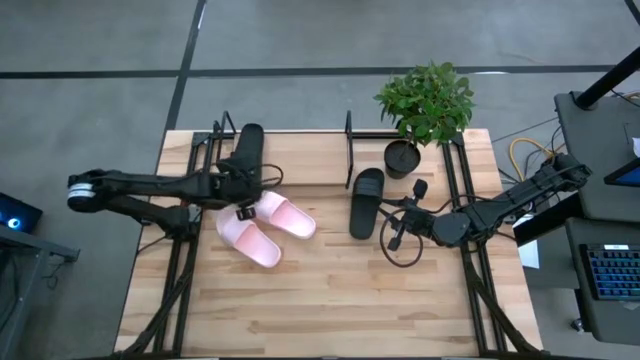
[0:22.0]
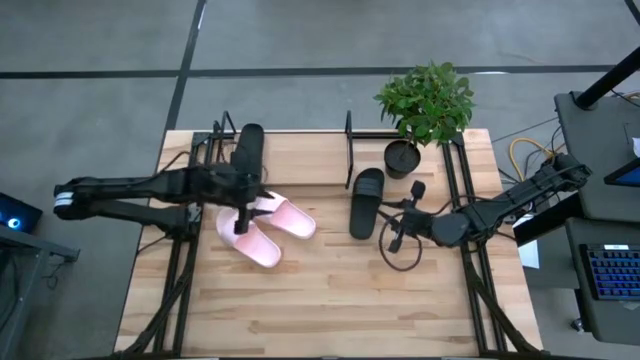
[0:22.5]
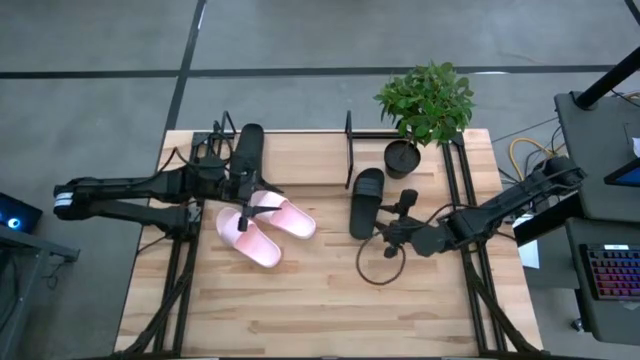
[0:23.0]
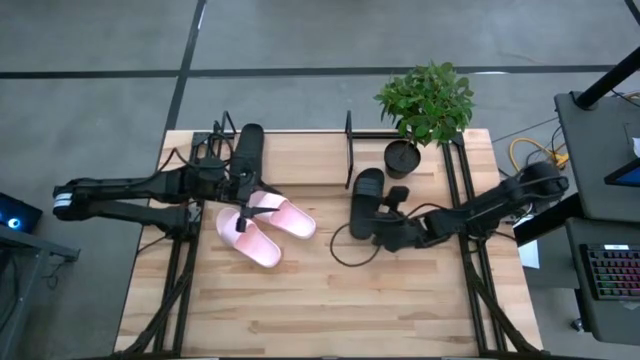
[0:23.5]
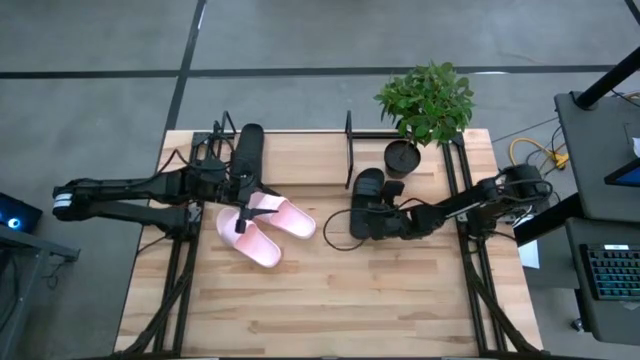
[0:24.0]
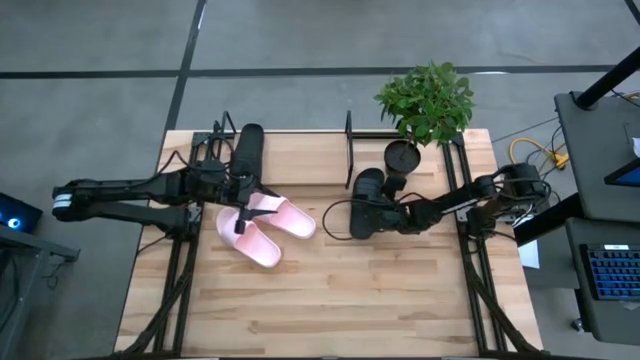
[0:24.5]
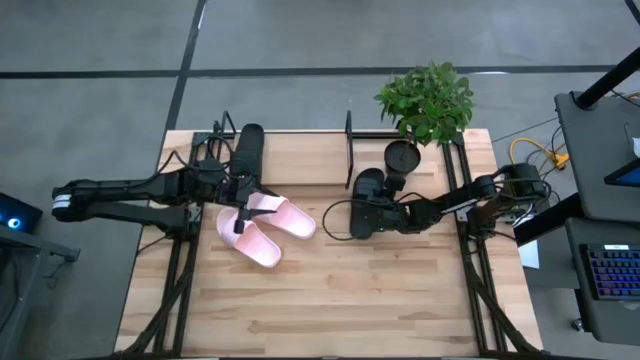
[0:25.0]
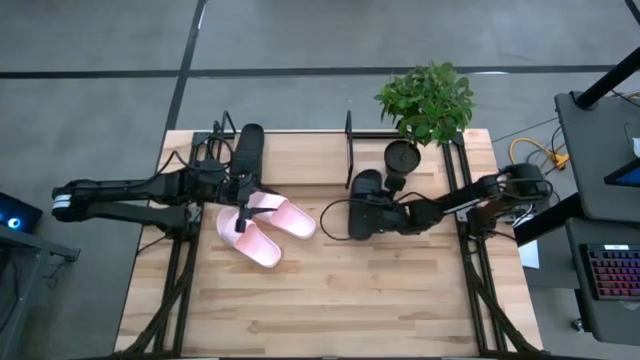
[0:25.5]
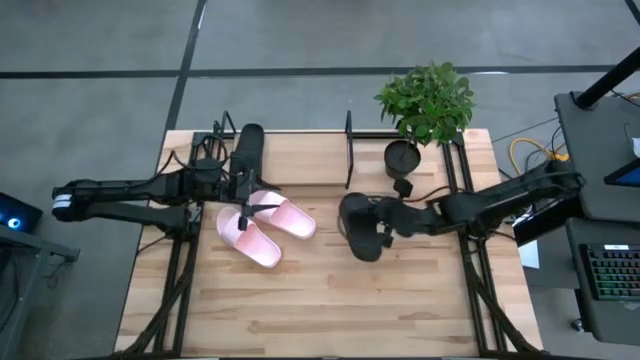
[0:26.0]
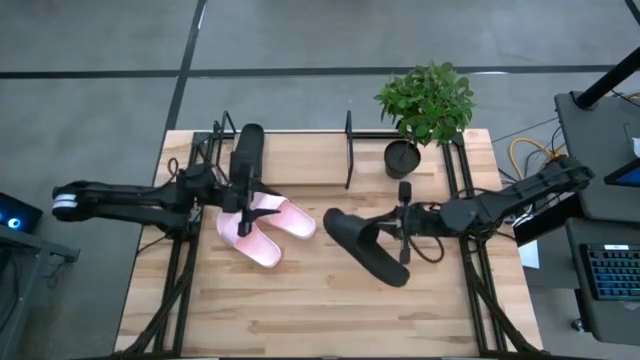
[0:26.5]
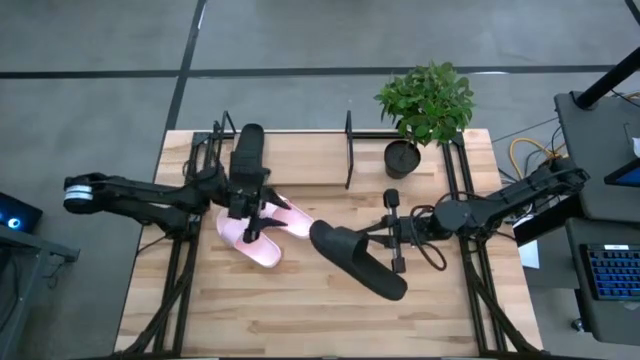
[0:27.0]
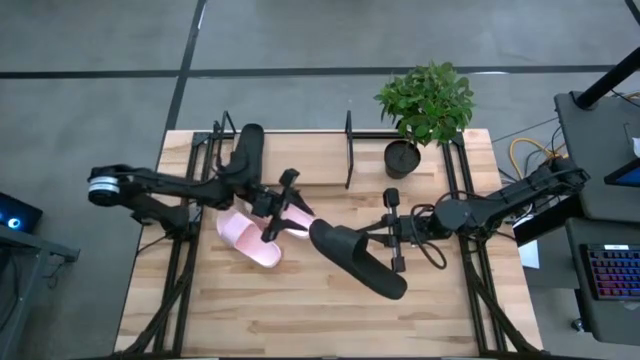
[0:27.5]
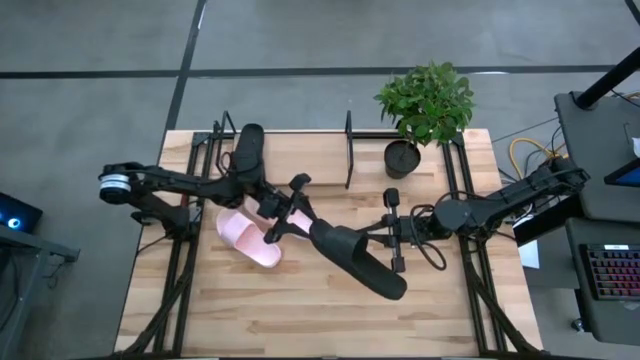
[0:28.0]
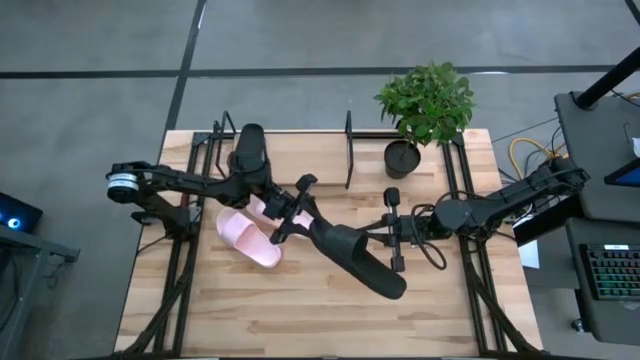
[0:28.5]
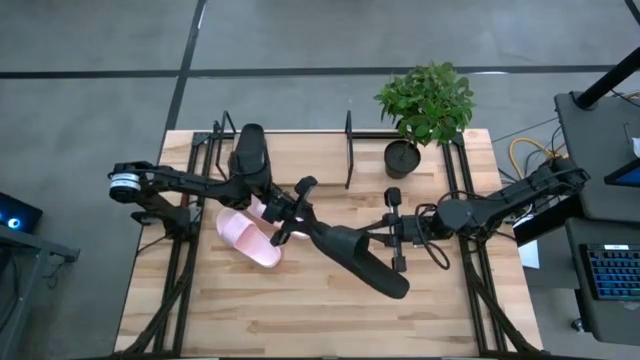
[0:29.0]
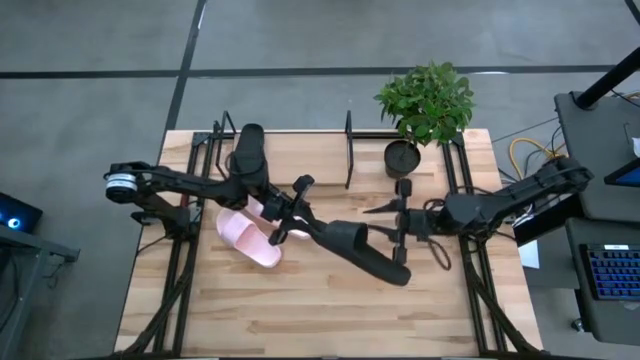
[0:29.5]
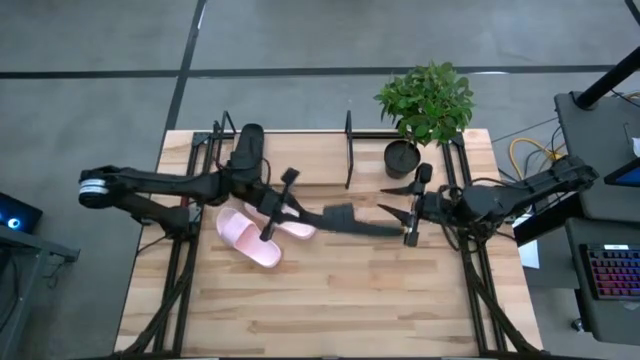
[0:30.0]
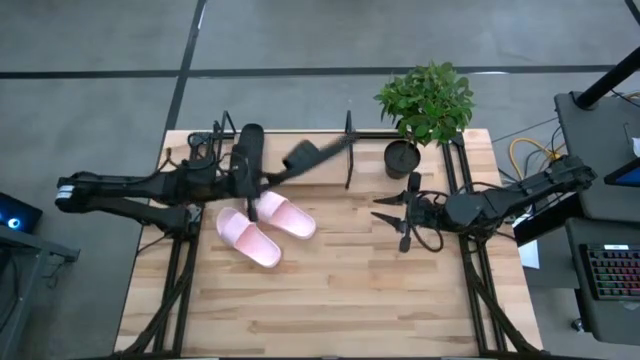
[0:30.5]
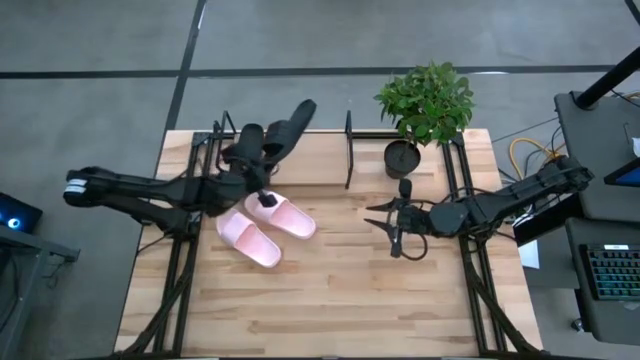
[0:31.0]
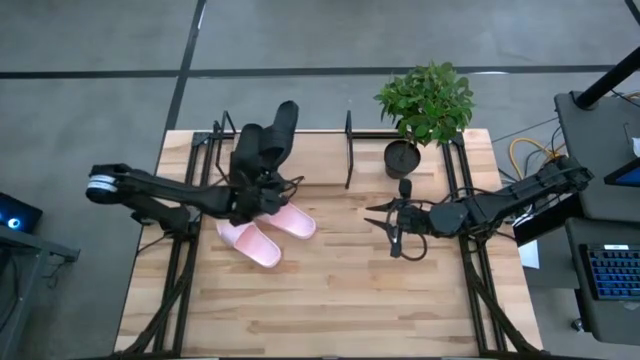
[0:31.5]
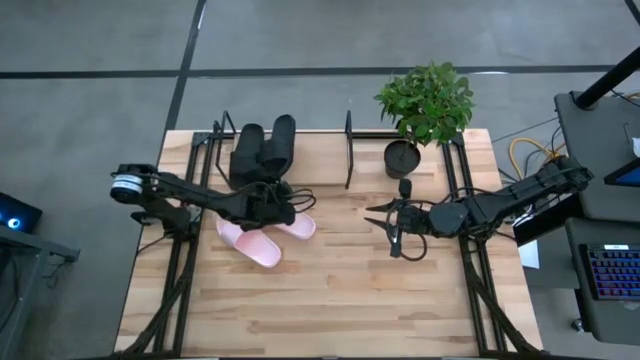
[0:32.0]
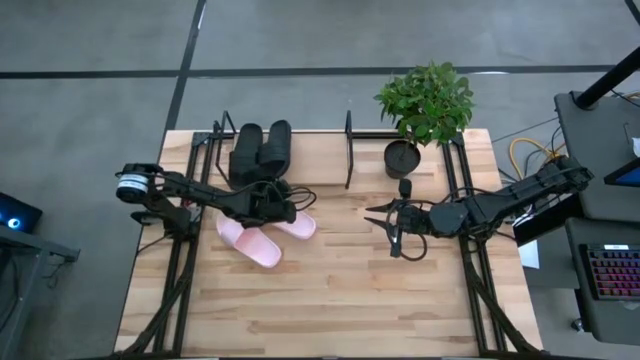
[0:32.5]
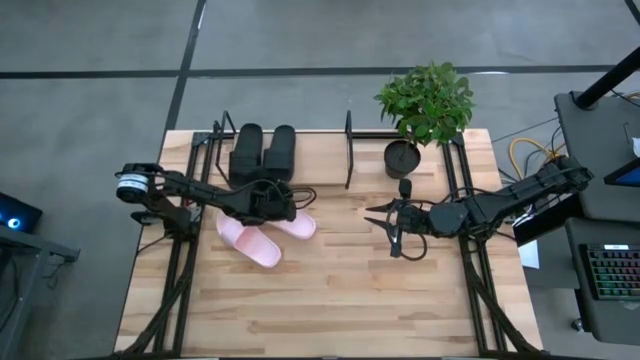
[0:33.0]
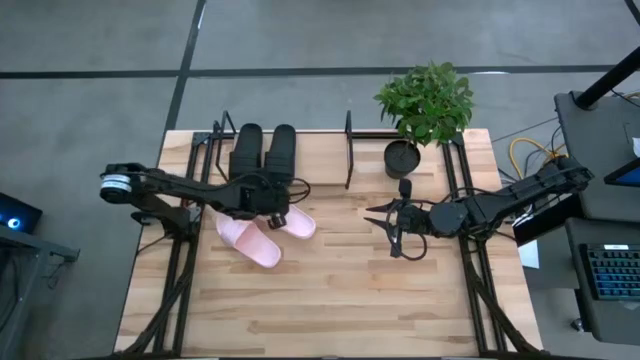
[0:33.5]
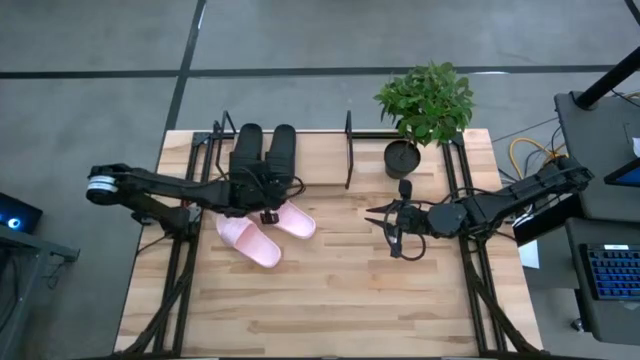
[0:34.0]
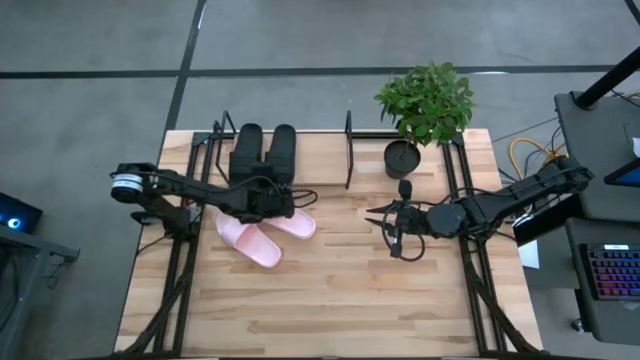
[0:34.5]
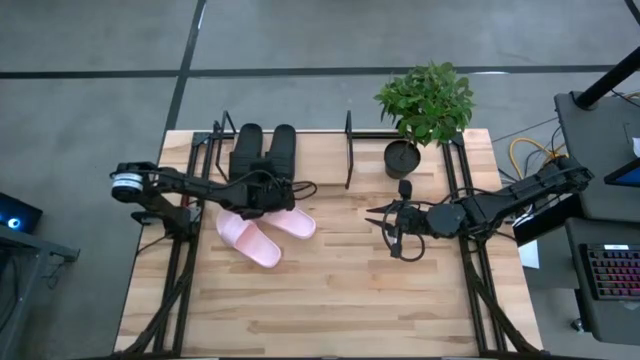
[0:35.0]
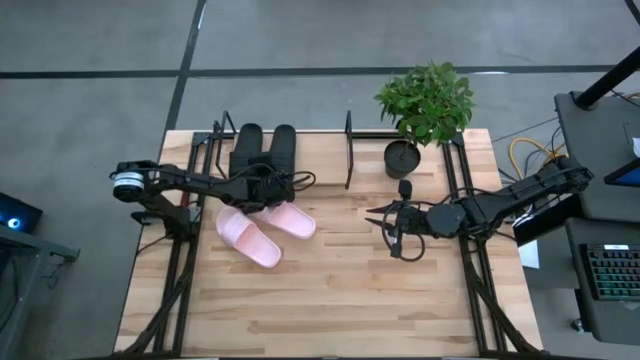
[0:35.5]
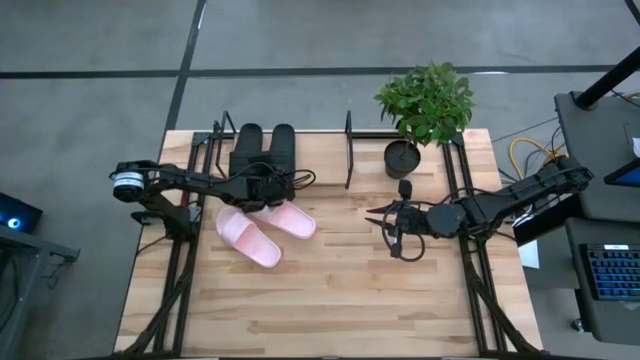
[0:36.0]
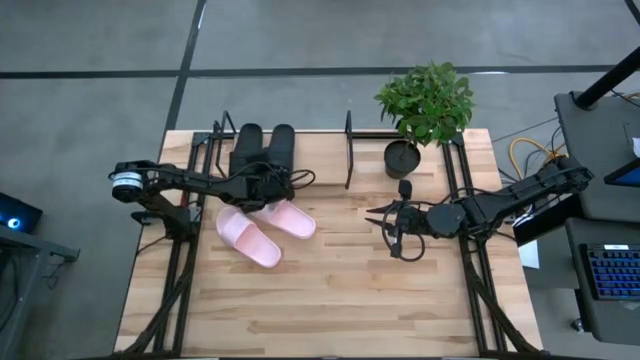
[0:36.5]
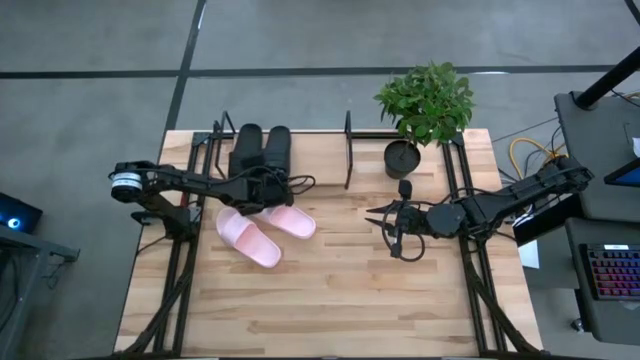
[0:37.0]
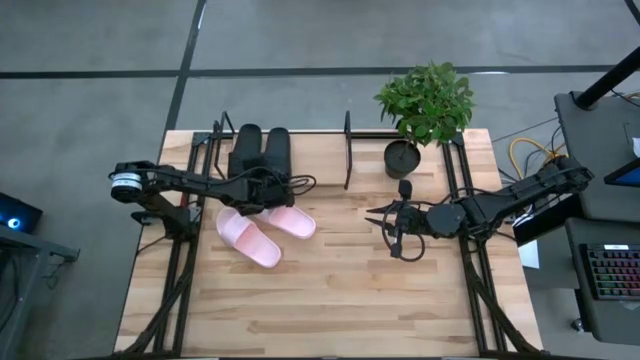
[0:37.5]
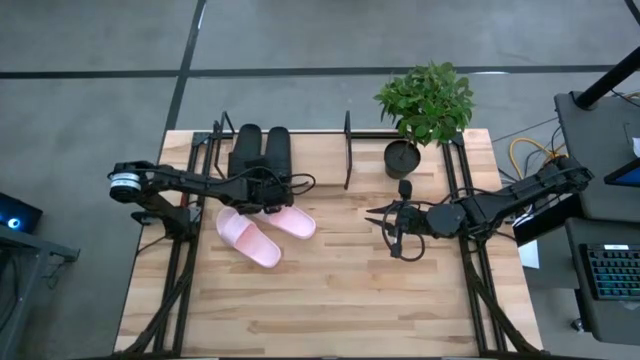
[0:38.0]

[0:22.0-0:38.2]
Task: Pick and place slides into the shelf
Put the black slipper on the shelf

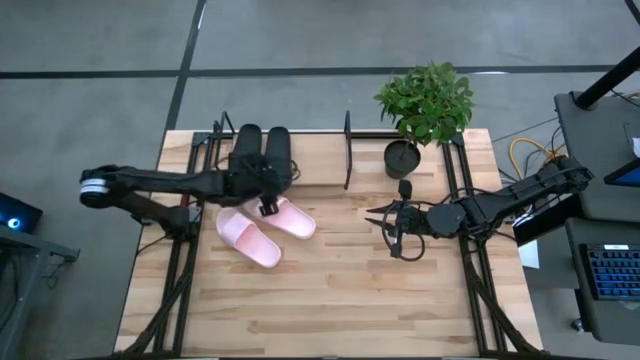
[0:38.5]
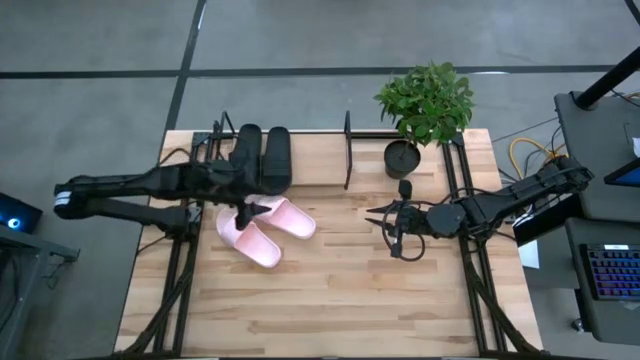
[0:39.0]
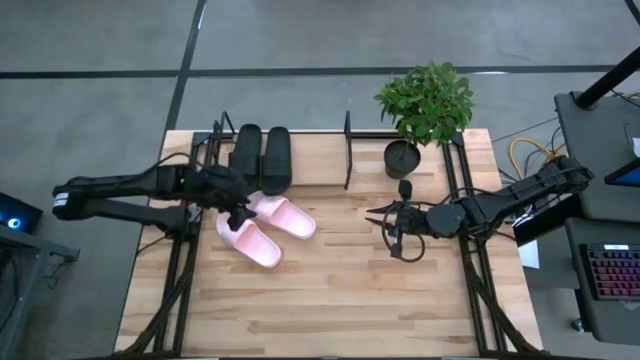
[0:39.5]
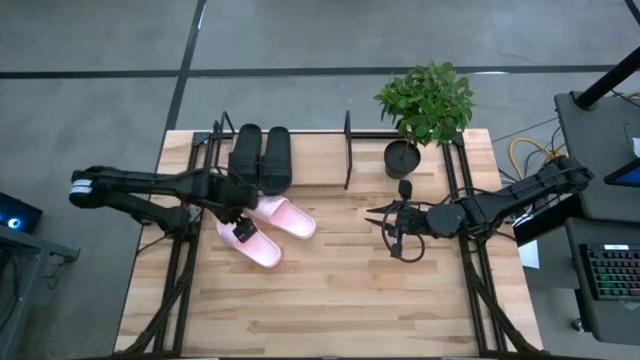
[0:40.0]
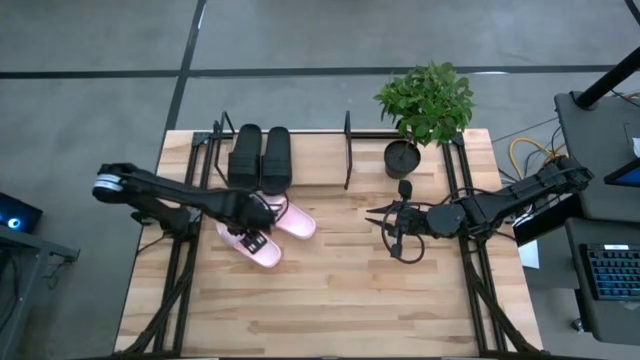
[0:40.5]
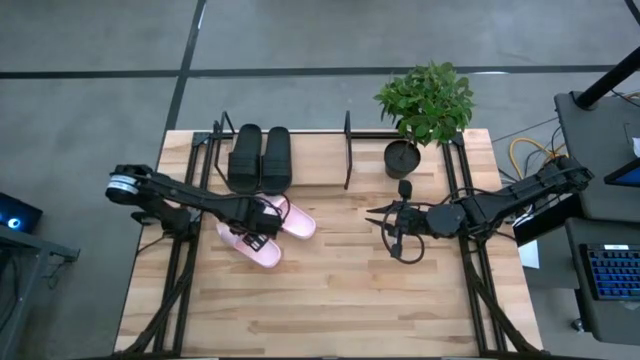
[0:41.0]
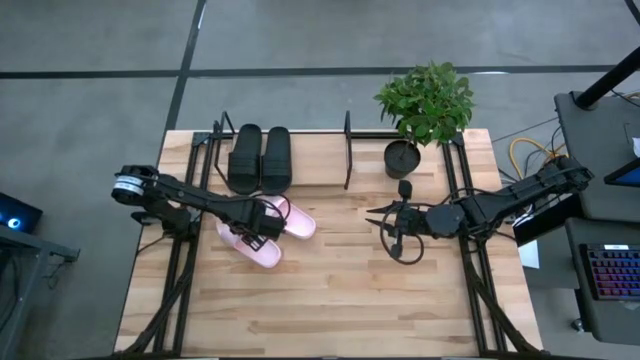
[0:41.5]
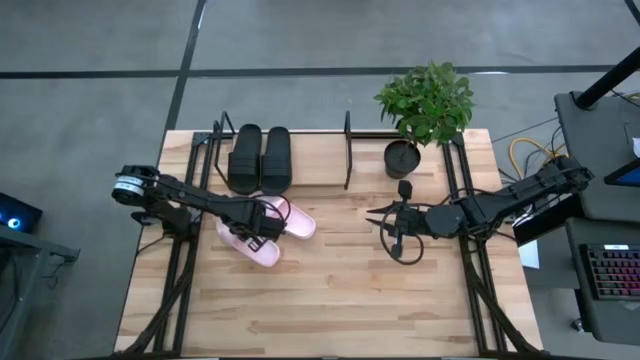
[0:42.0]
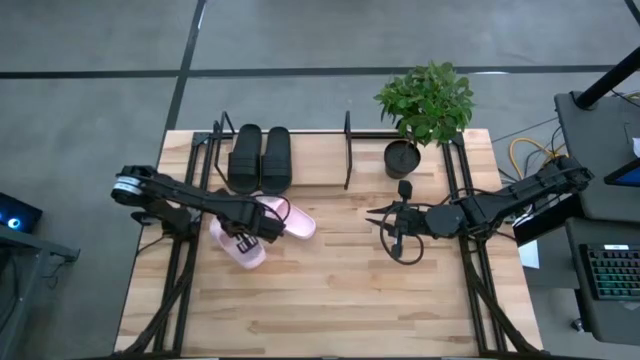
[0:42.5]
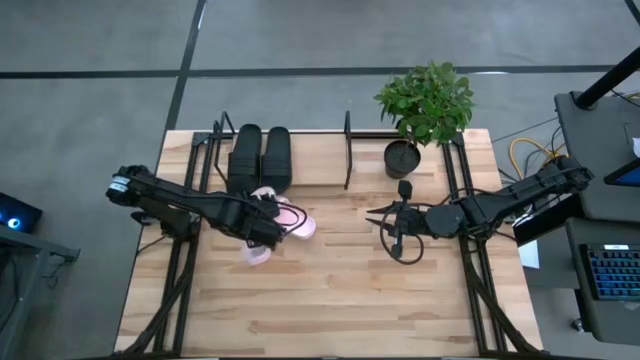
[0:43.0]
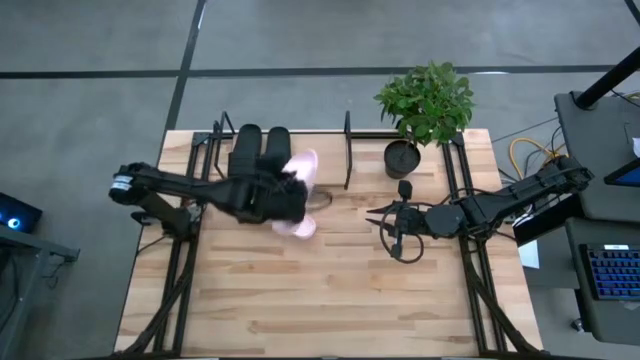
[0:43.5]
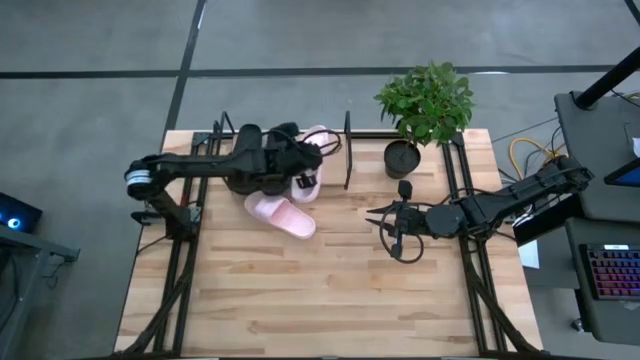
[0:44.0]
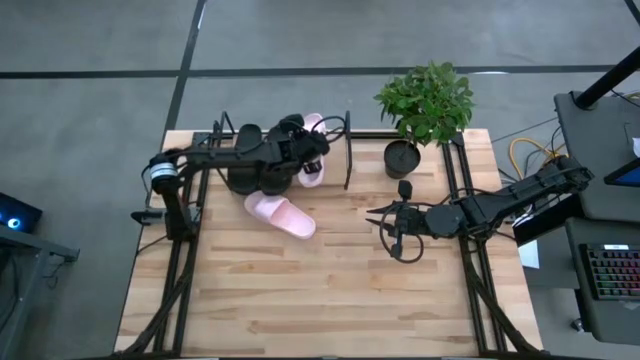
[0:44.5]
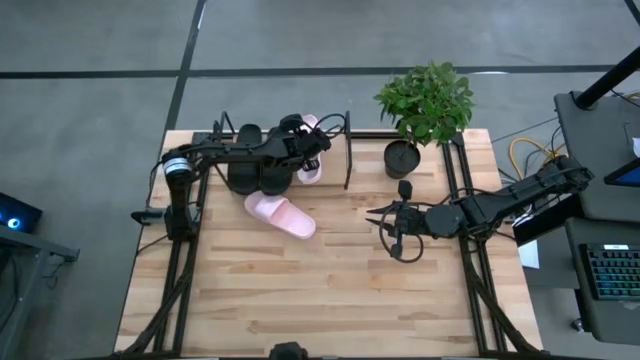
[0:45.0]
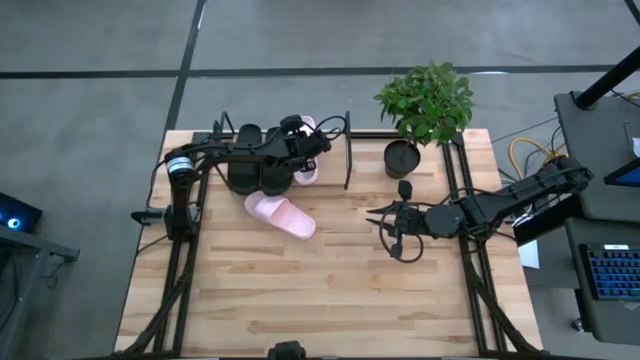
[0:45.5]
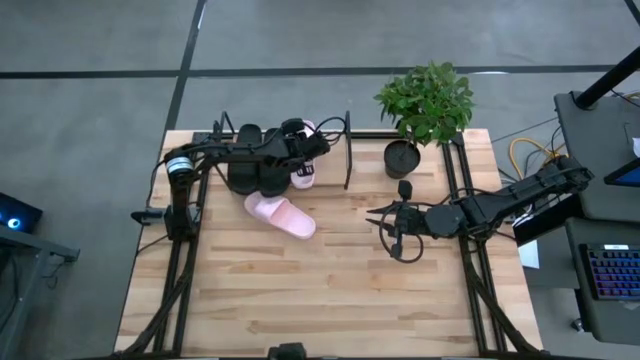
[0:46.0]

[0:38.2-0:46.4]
Put the left pink slipper on the shelf
